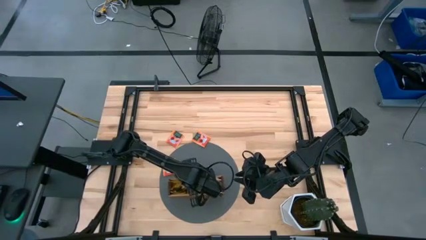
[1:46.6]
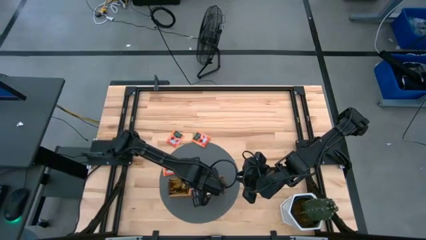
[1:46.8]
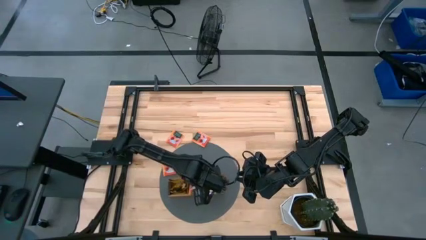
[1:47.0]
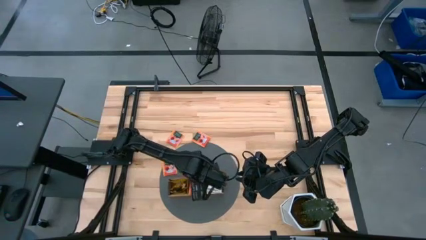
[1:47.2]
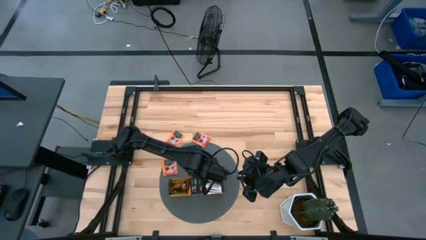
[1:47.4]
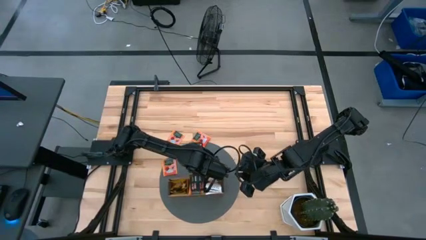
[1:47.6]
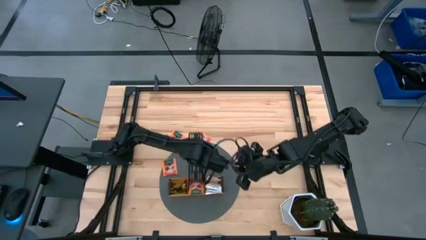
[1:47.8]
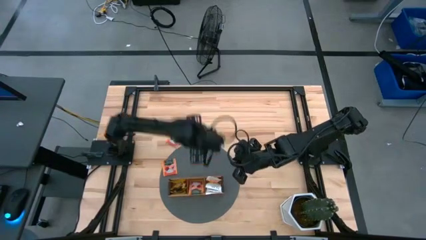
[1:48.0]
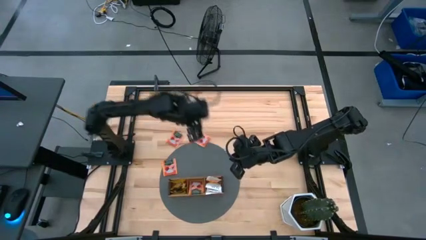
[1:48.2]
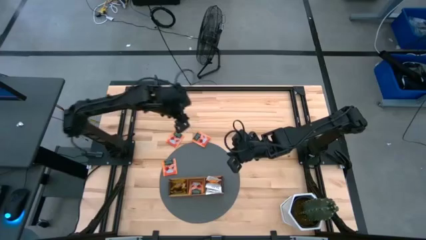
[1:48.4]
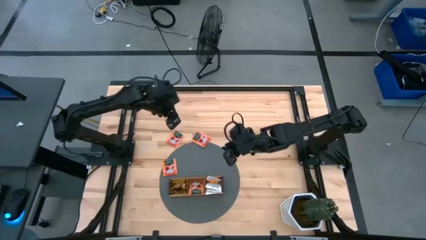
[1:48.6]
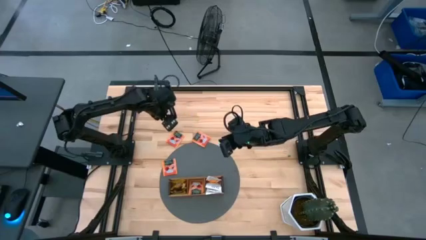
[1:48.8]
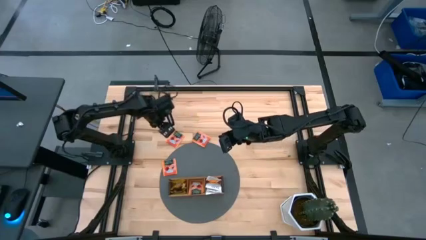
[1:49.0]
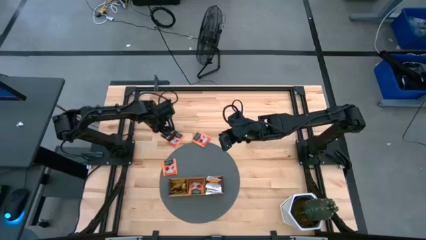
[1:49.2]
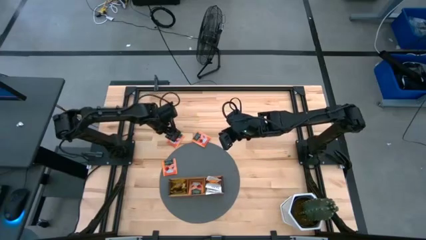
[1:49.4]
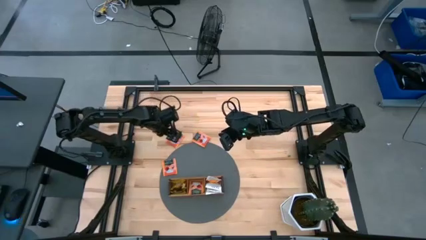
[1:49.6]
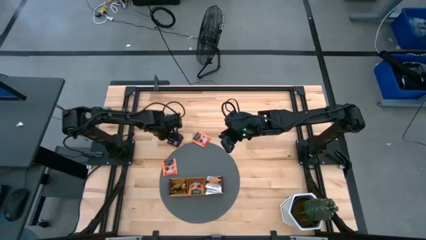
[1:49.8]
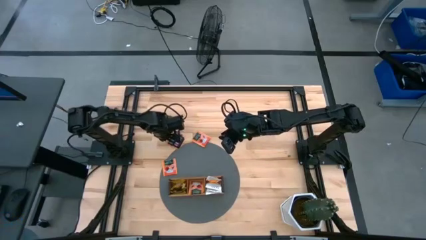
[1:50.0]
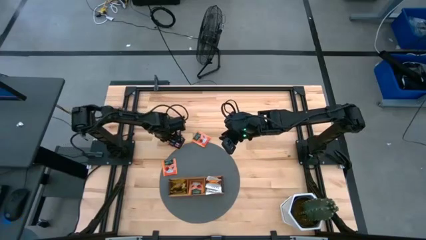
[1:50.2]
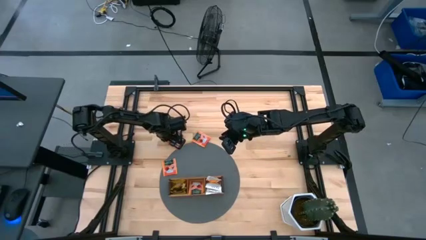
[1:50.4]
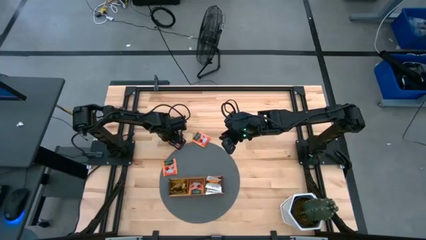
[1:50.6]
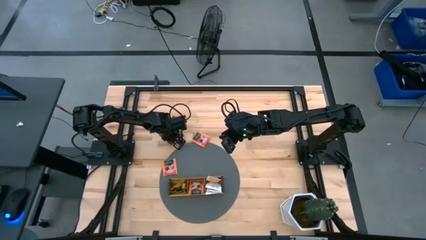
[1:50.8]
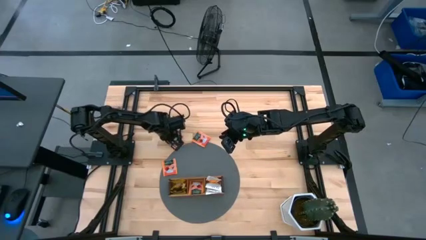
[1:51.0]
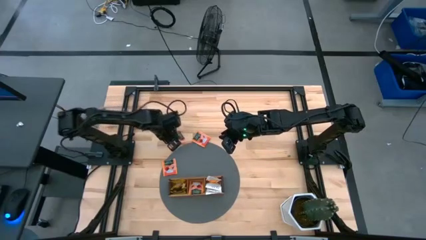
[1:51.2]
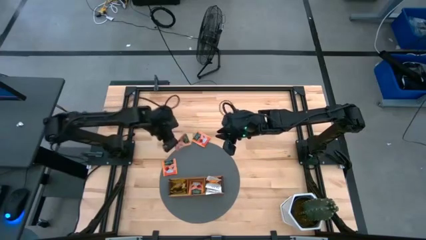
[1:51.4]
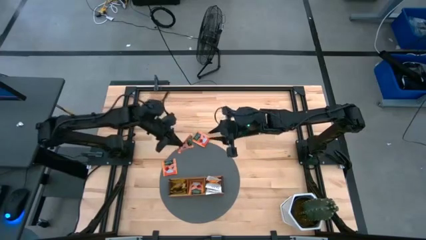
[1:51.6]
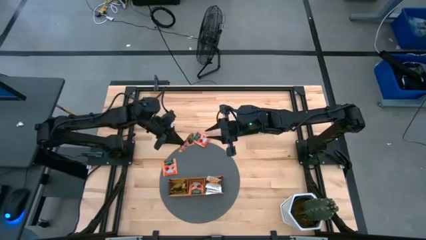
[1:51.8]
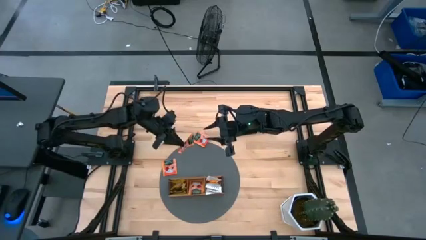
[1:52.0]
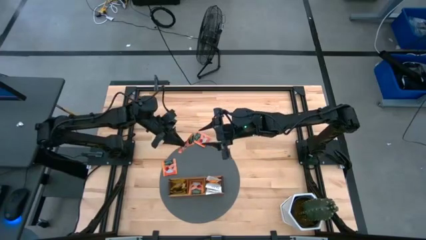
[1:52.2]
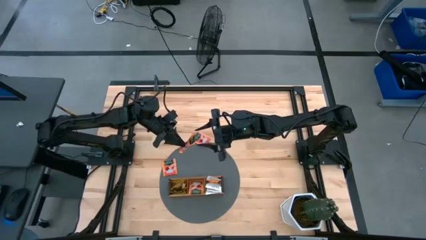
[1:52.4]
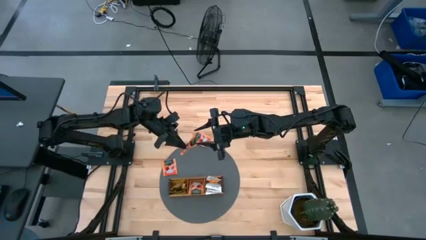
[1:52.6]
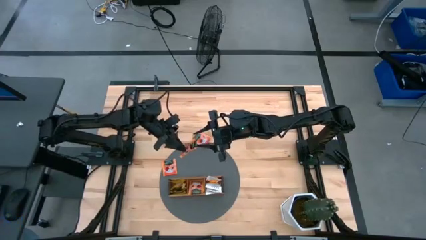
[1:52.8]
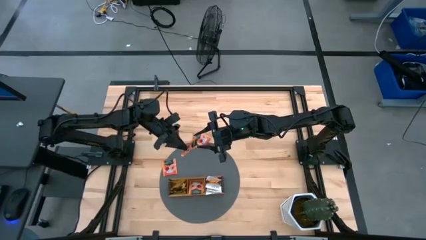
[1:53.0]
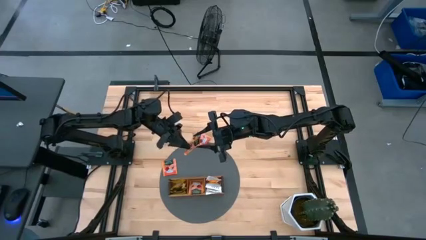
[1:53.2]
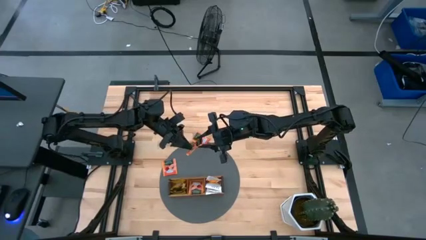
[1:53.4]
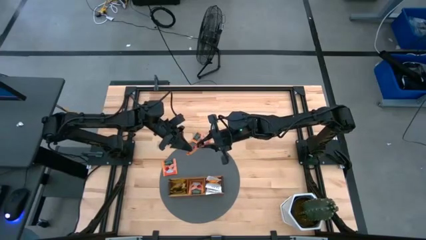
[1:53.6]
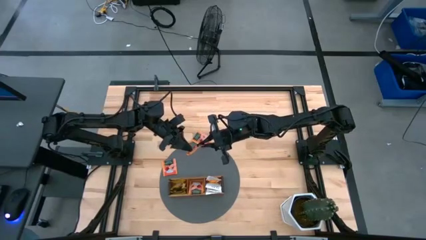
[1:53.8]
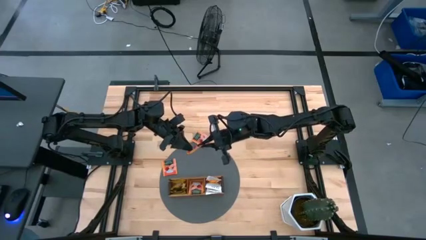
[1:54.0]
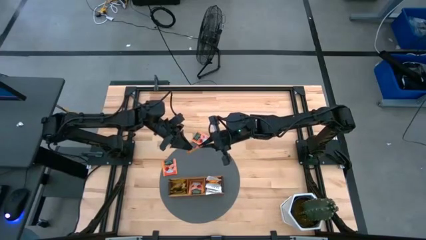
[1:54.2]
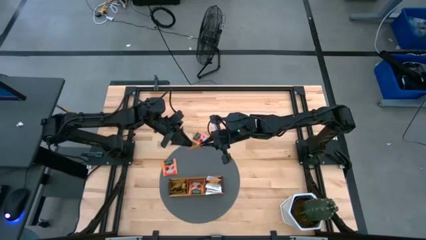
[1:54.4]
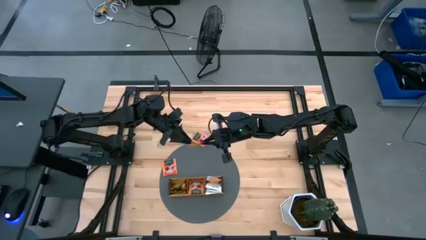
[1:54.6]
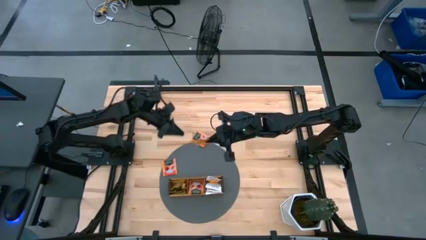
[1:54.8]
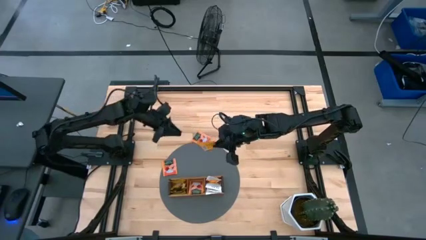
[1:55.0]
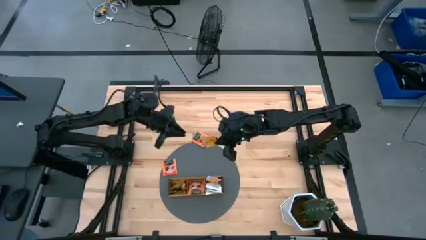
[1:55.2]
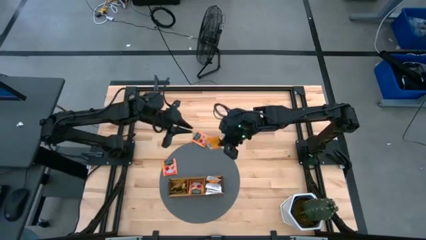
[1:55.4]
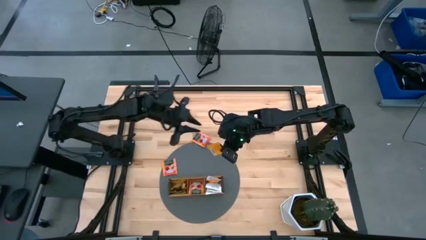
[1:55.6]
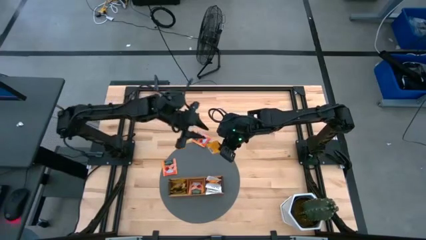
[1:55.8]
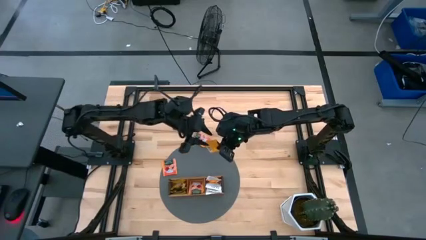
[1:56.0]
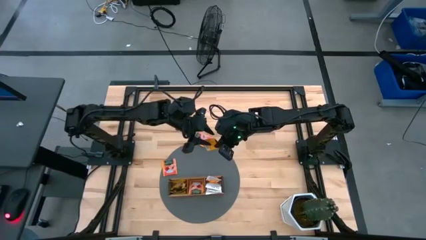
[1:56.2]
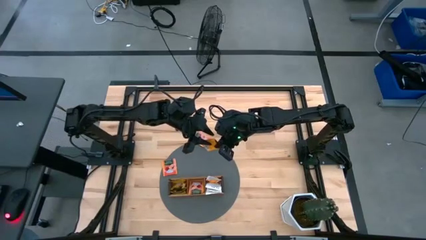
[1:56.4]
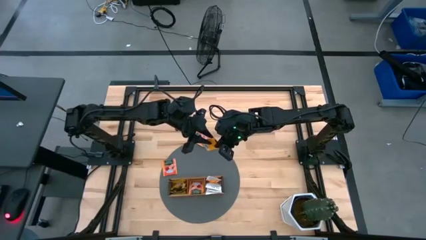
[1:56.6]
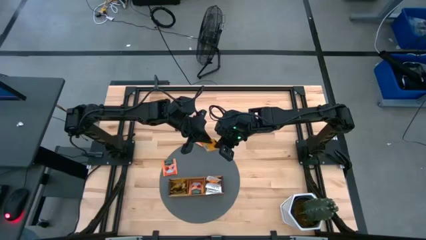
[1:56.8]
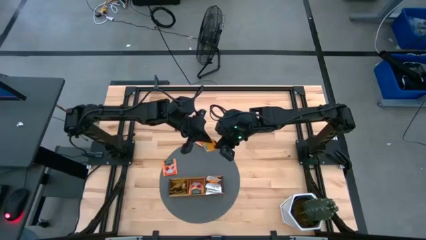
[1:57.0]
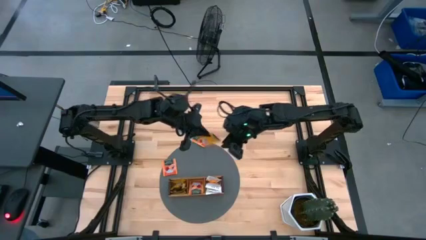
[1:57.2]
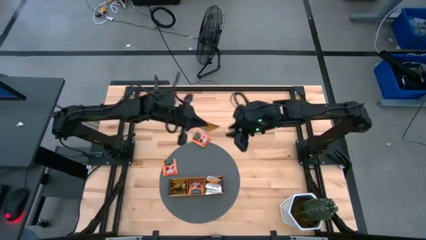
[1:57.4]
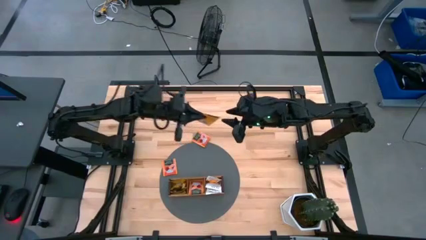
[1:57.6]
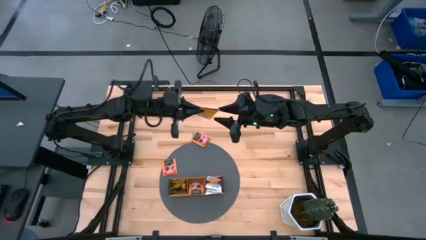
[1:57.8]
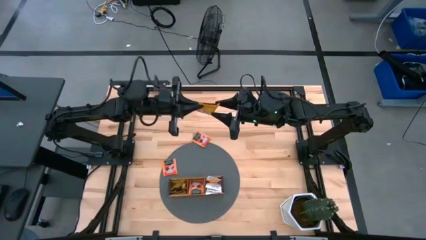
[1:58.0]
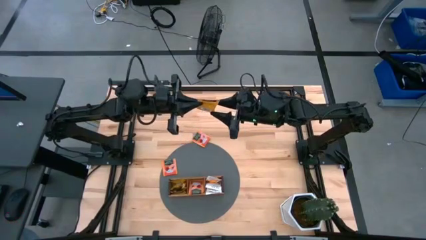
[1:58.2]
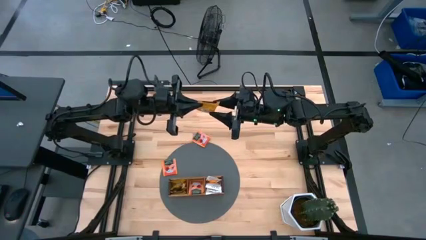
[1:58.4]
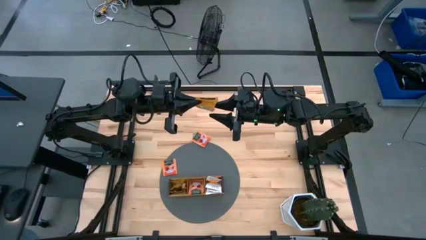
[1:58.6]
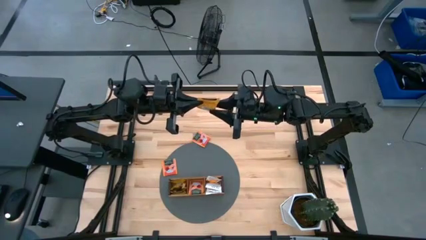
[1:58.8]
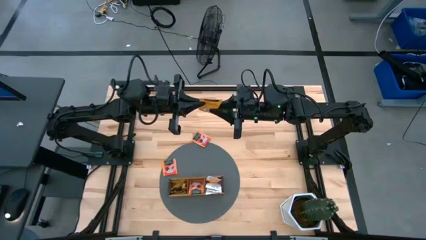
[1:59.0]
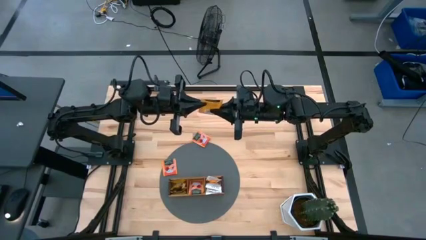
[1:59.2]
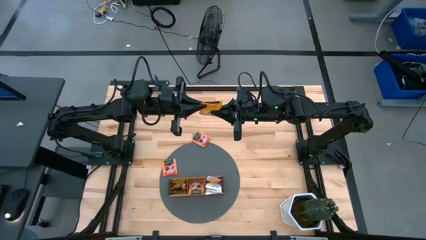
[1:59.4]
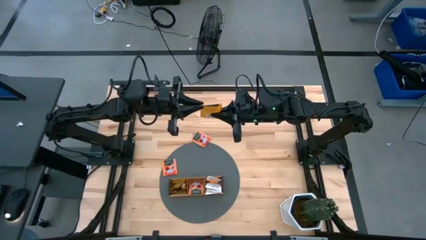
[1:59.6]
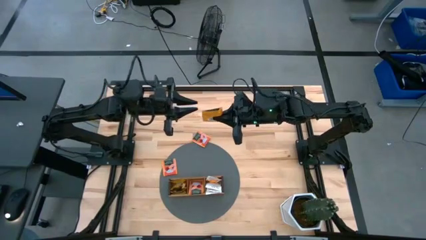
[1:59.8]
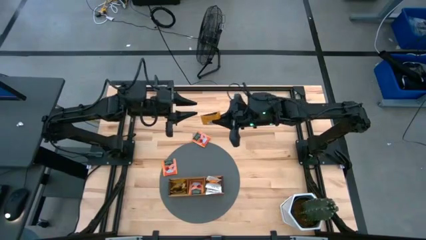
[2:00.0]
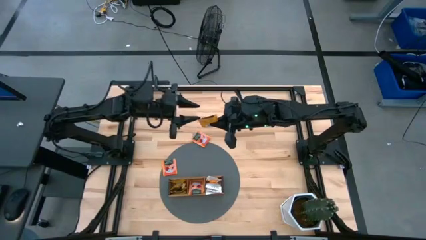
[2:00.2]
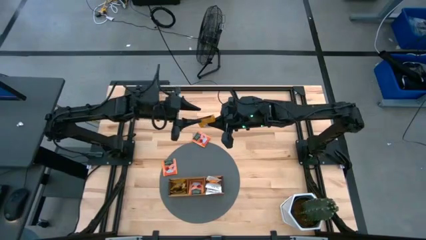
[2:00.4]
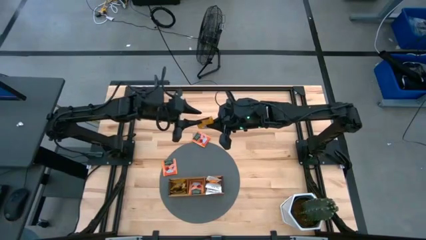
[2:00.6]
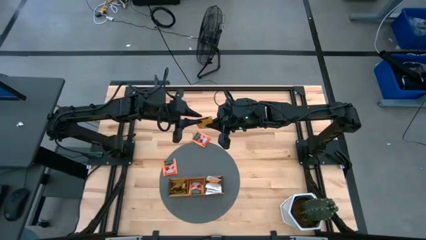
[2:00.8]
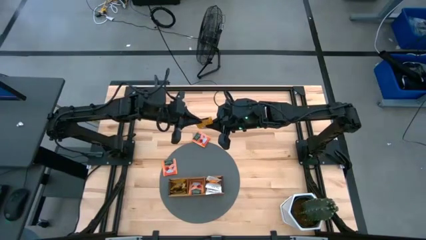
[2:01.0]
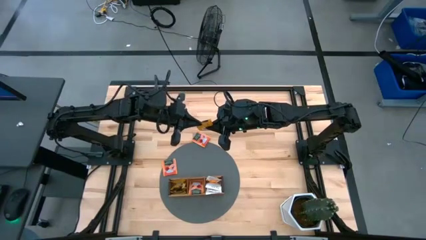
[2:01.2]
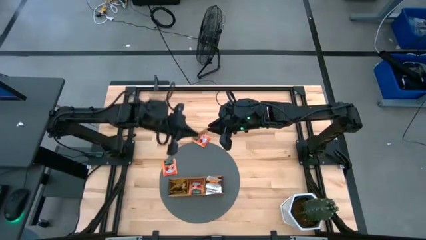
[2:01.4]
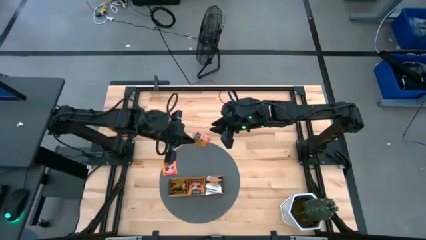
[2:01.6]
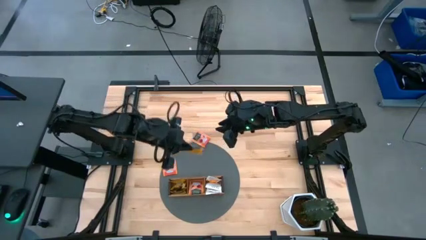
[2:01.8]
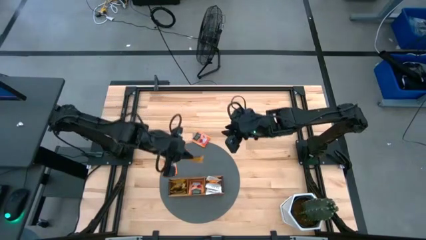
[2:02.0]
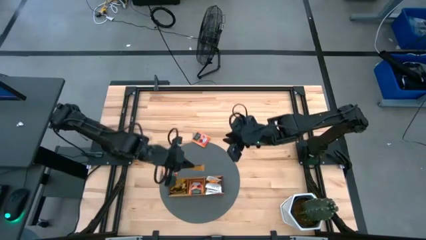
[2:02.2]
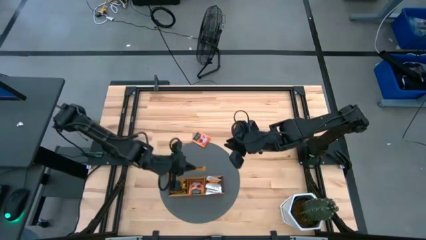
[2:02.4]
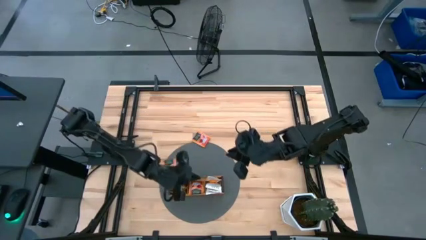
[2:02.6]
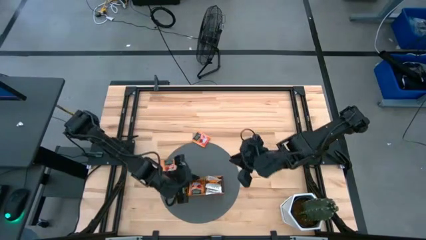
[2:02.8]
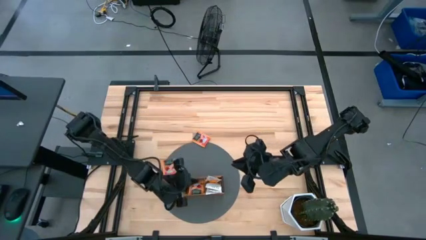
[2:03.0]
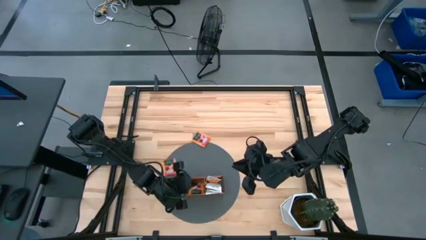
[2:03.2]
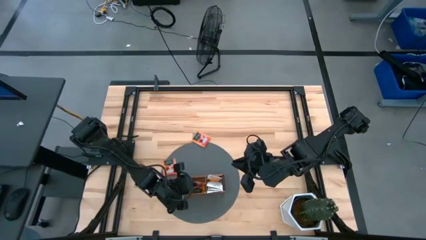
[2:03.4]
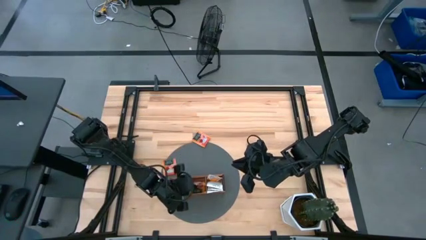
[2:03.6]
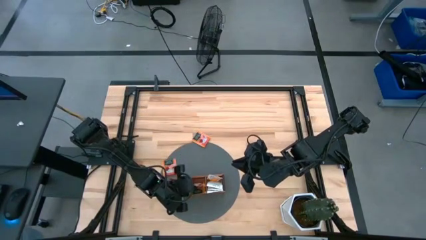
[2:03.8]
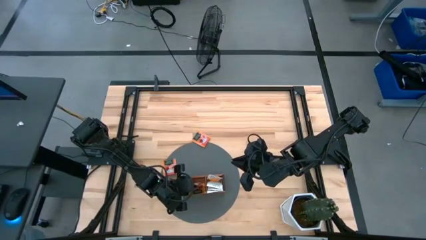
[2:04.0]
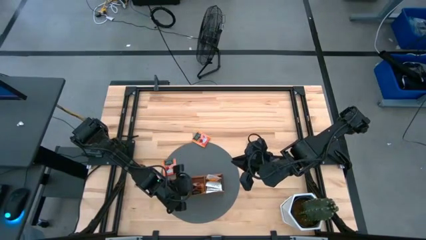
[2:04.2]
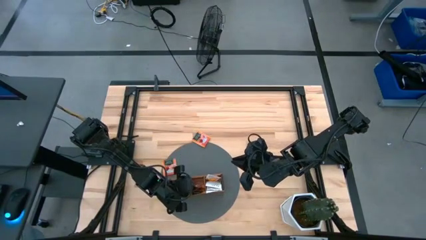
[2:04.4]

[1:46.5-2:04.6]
Task: Pick & Place Tea
Put the orange tea bag into the middle section of the wooden organizer
